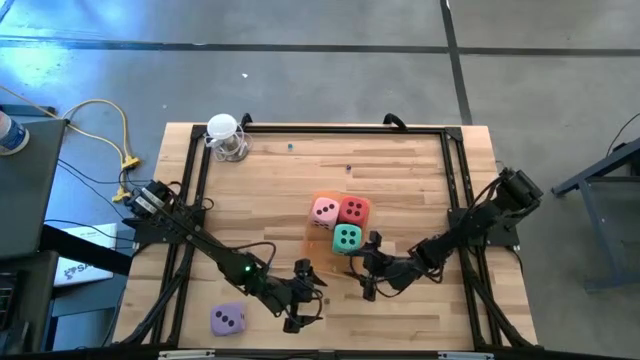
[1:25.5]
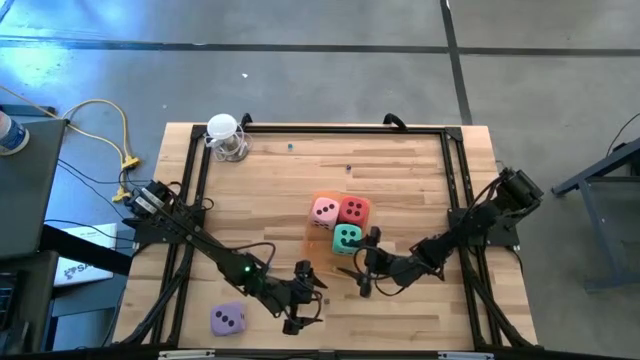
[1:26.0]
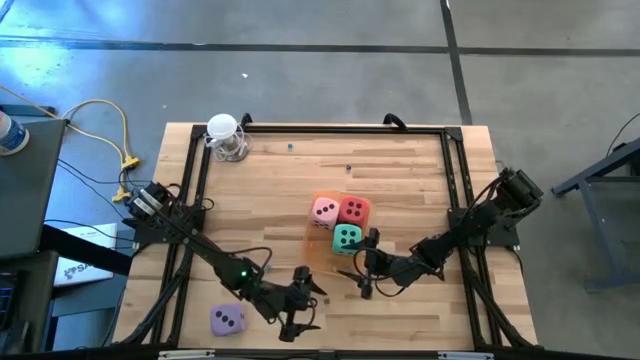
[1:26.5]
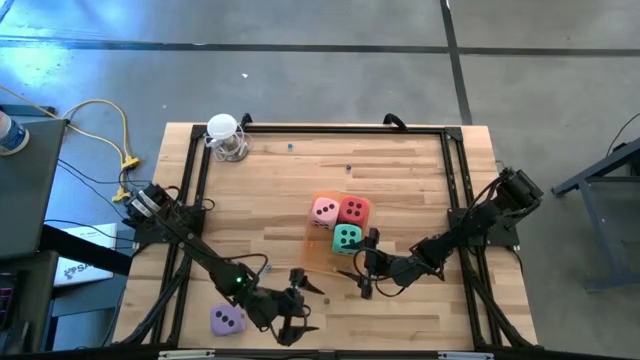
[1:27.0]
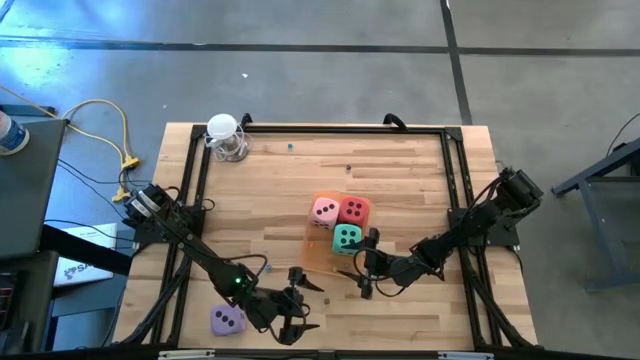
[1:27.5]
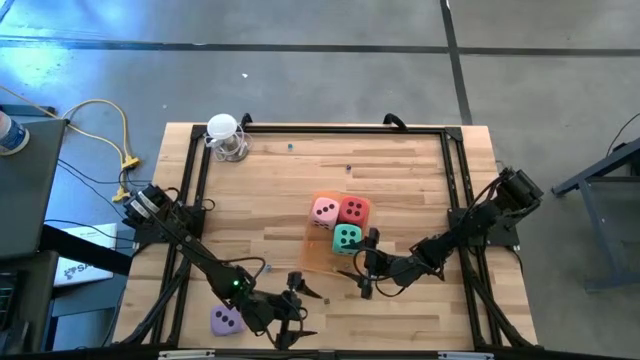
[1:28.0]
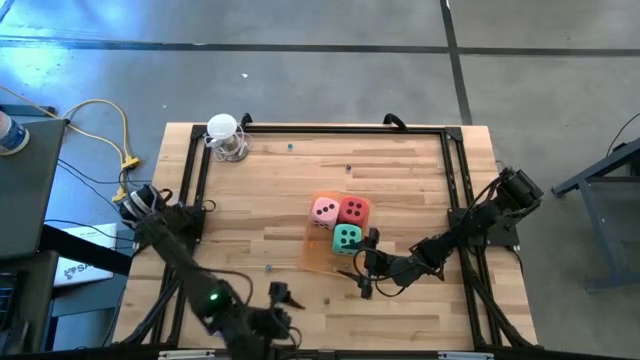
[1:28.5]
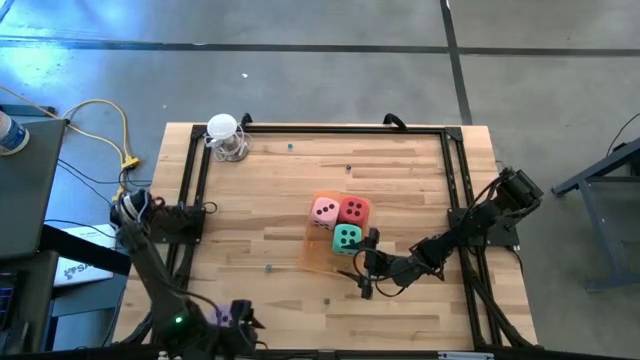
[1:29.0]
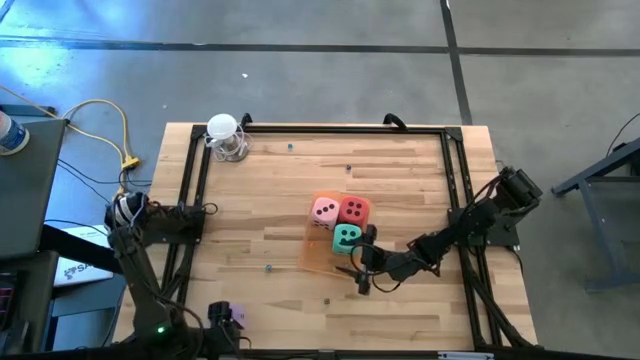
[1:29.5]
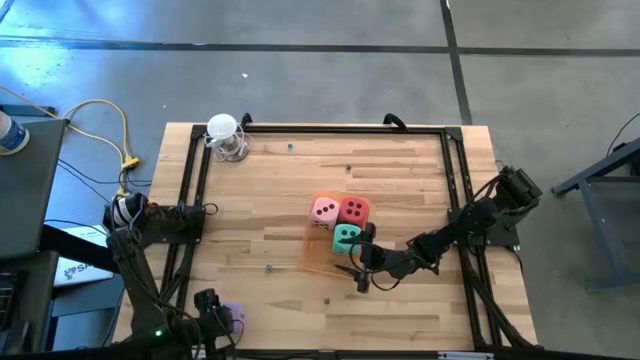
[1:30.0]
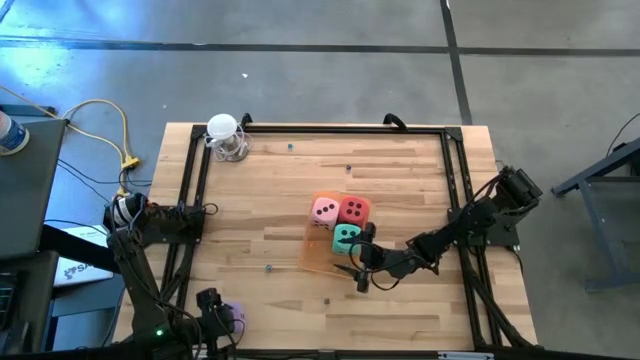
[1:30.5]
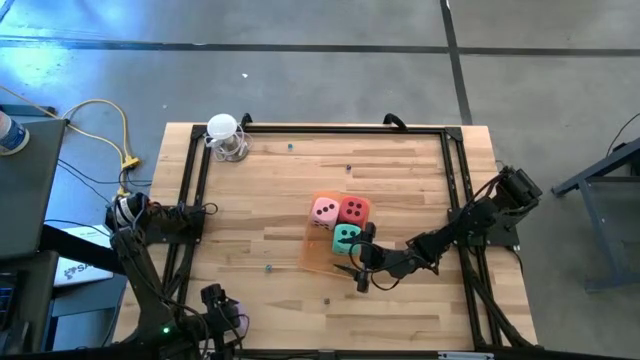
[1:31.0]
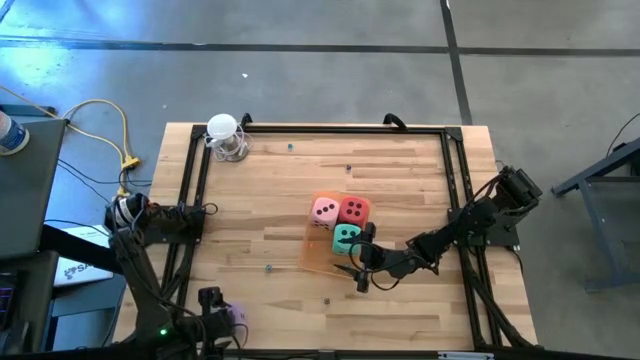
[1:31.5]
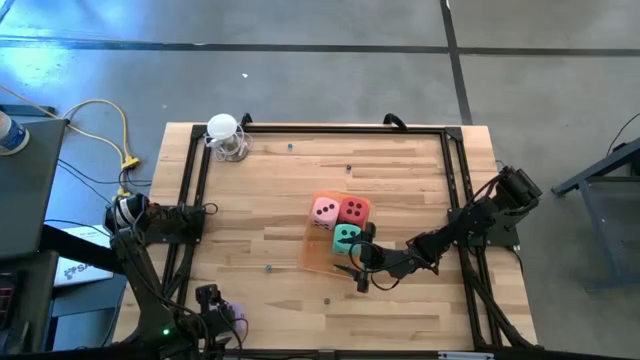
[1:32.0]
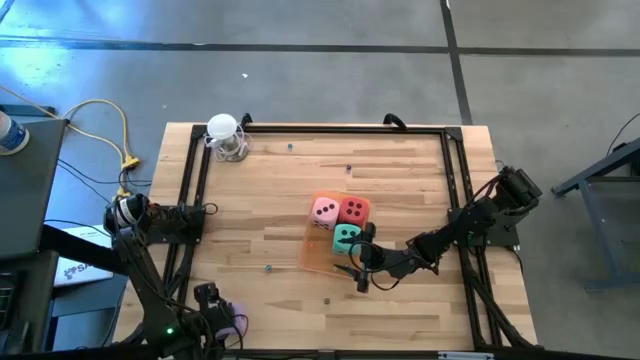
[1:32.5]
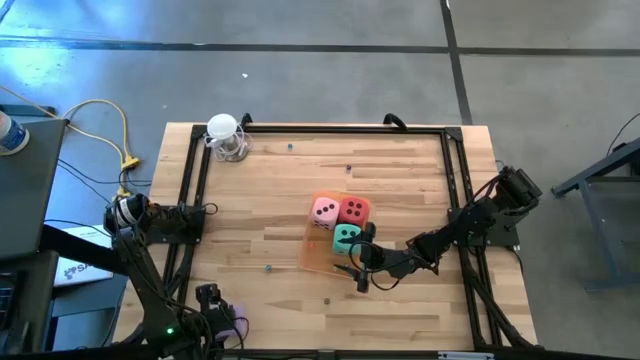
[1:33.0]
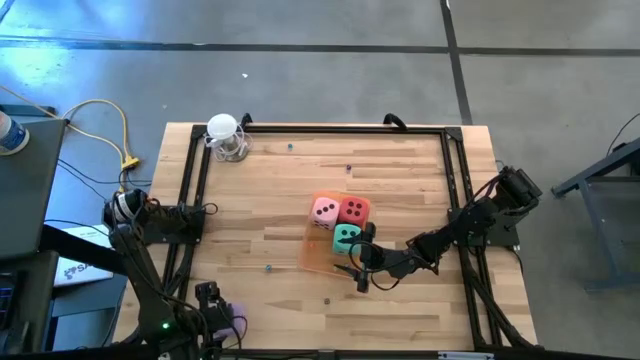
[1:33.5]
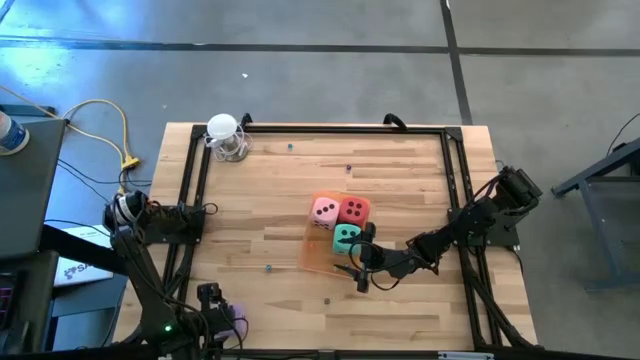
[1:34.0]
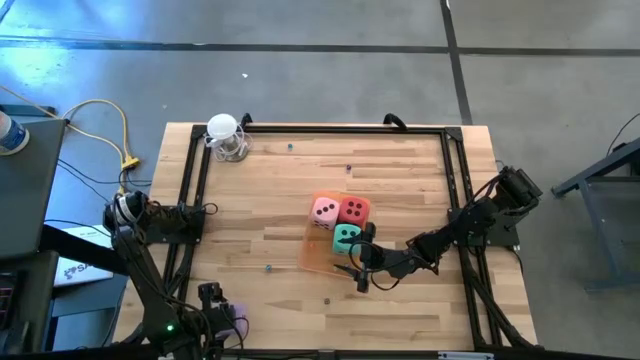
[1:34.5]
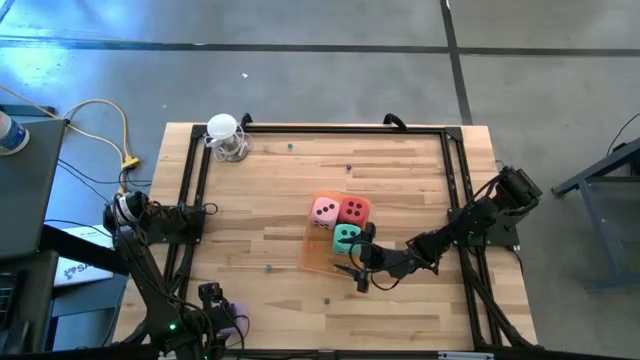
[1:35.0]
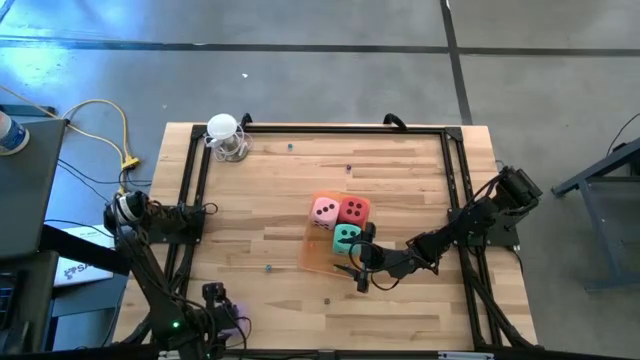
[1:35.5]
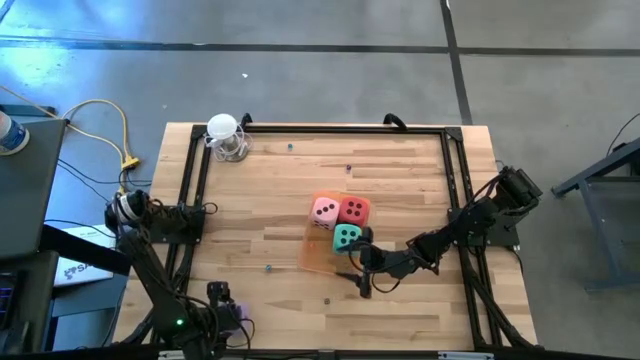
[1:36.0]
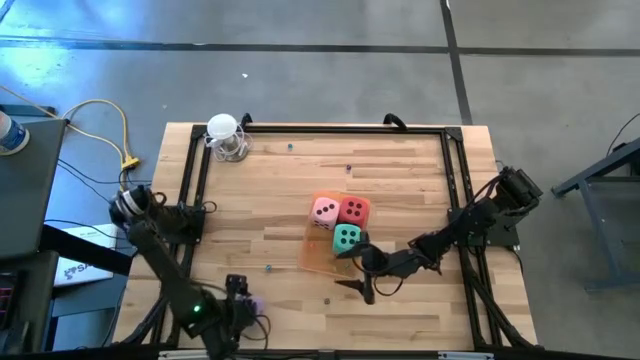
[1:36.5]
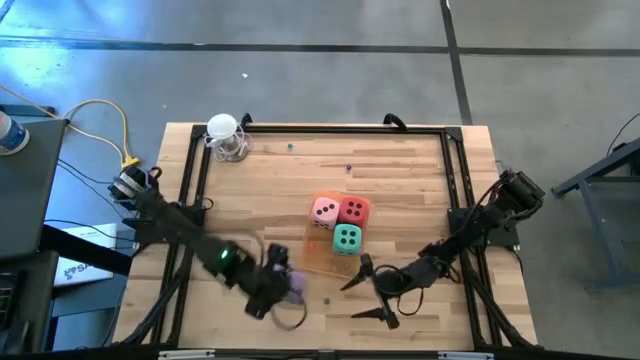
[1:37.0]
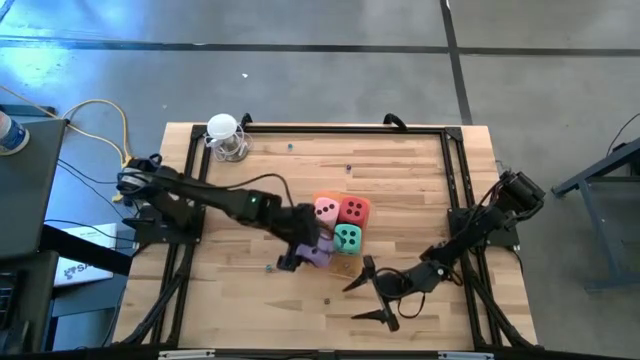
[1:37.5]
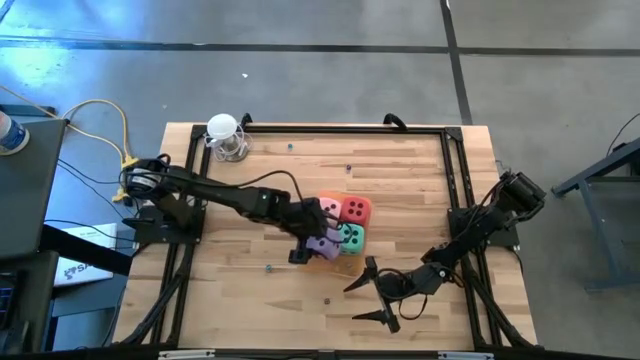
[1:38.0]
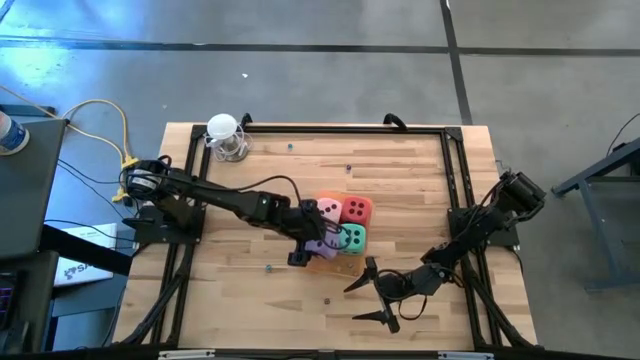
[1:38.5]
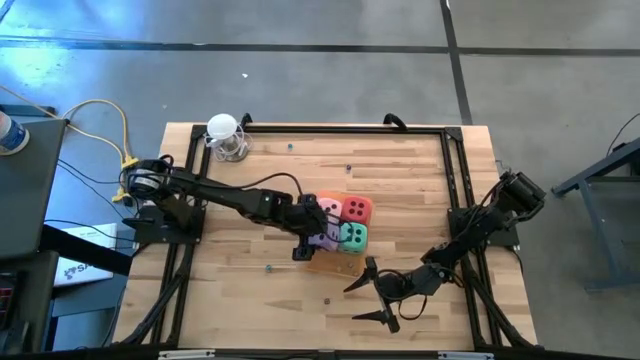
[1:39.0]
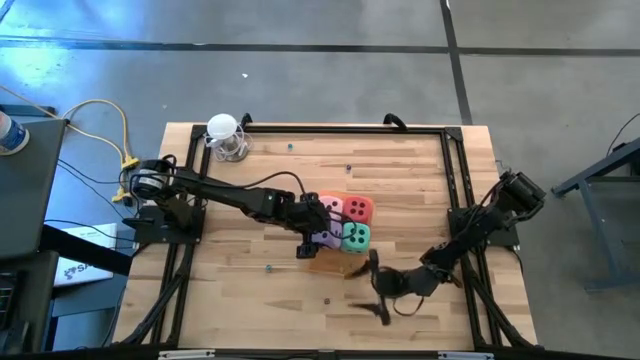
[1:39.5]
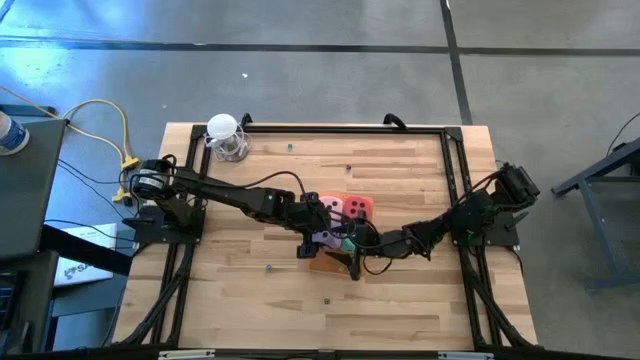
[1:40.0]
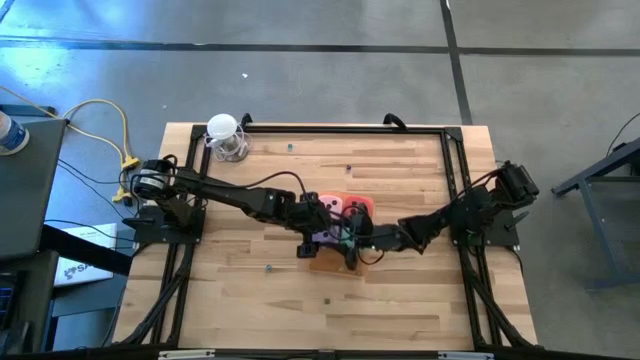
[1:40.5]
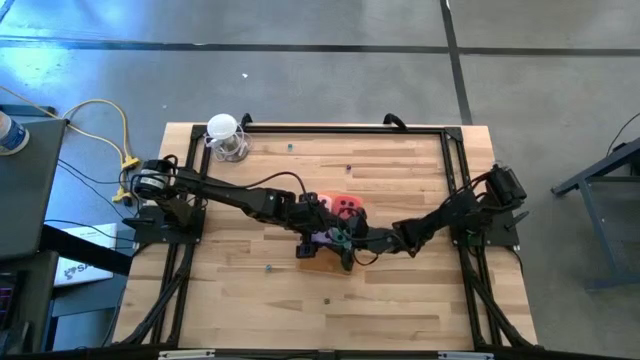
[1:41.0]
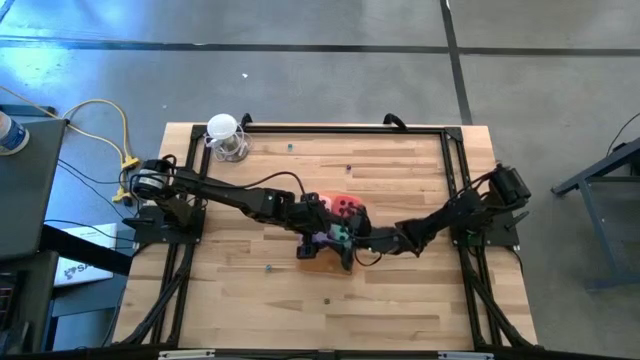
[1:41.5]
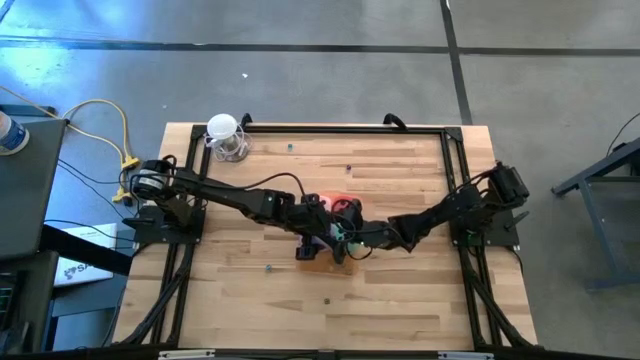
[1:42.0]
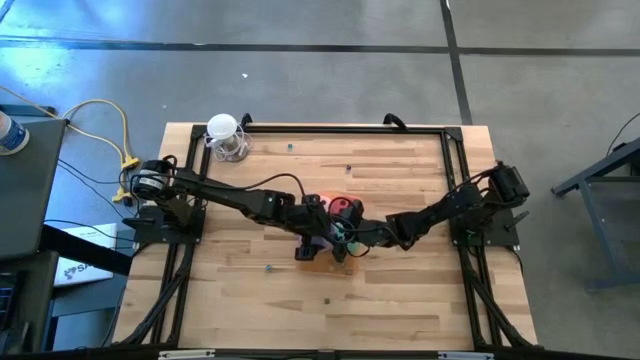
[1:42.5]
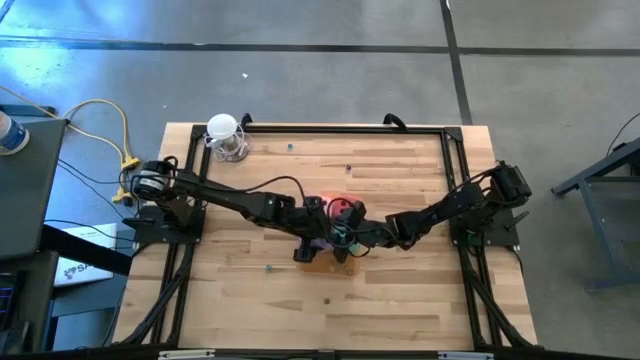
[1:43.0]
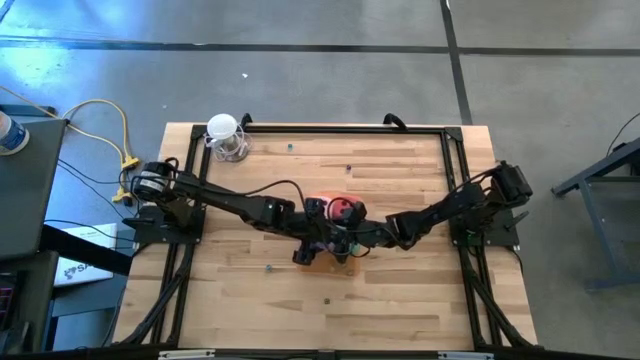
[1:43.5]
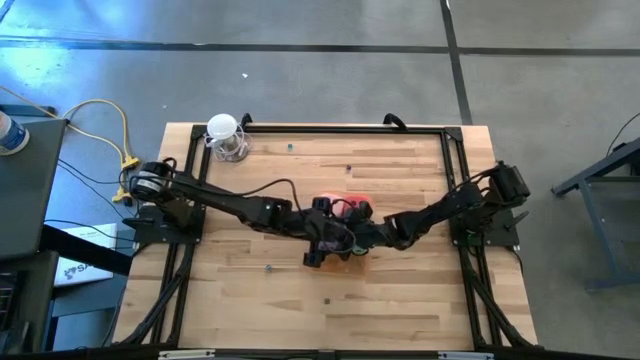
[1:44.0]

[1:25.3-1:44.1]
Task: Pick & Place Dice
Put the large violet die into the orange bin

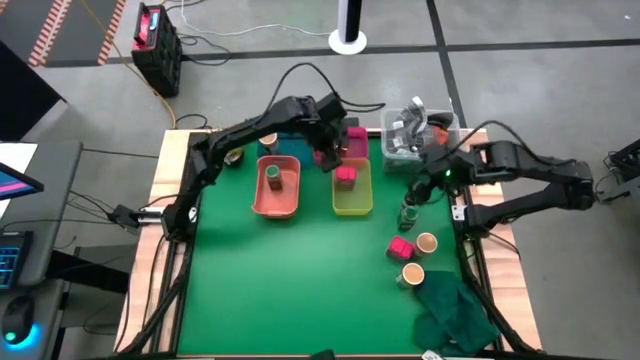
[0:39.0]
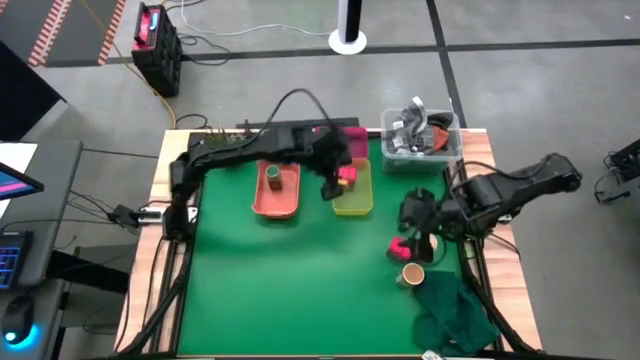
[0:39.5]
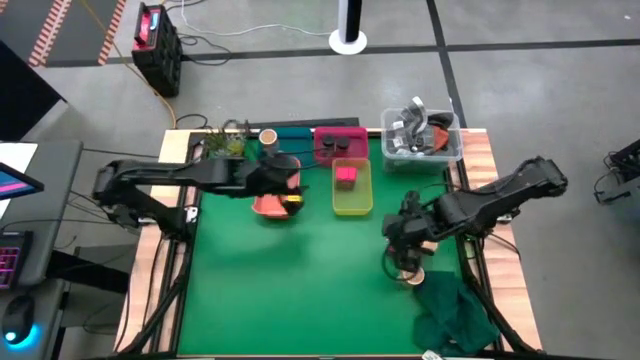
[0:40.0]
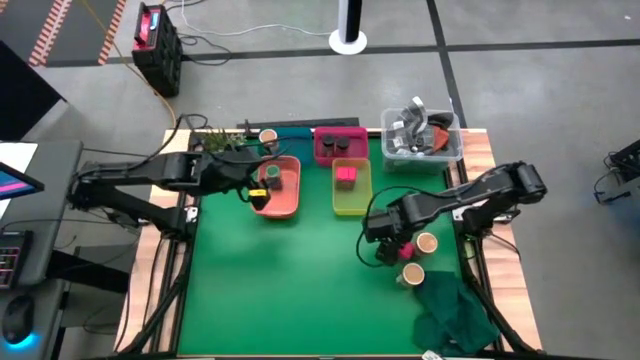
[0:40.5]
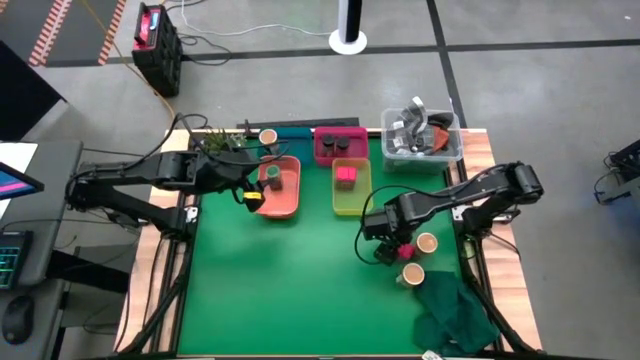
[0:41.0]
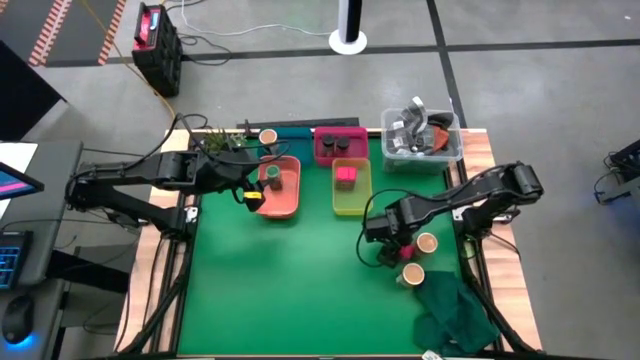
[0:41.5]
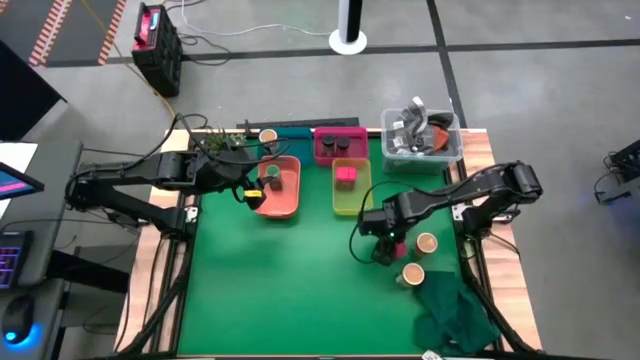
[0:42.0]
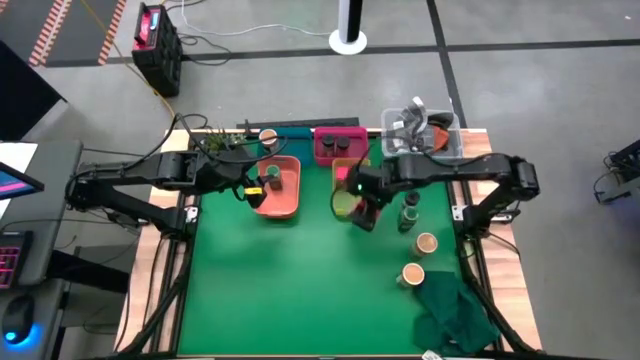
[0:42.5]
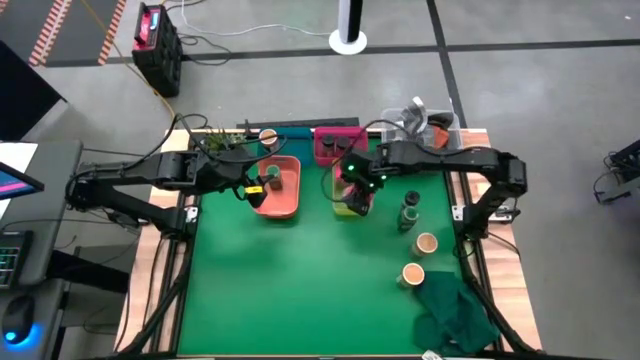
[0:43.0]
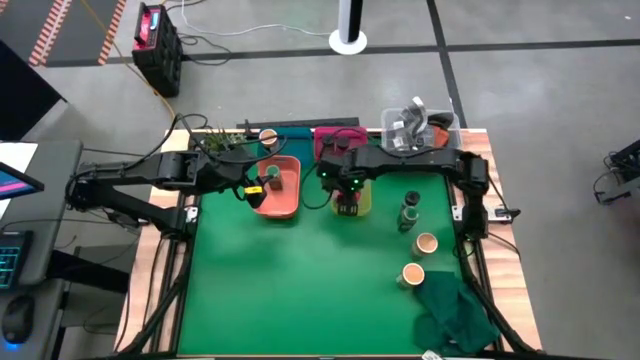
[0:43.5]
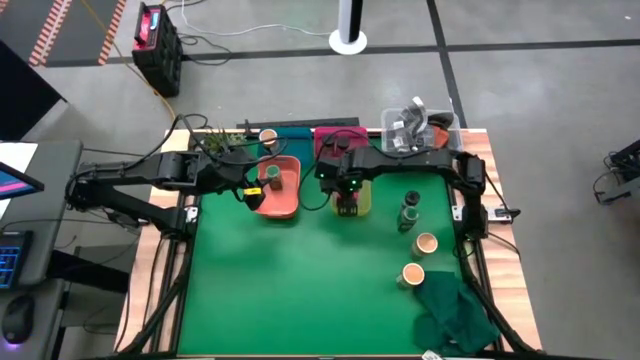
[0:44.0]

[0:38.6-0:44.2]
Task: Sort spices by type
Put the red seasoning can into the yellow bin
